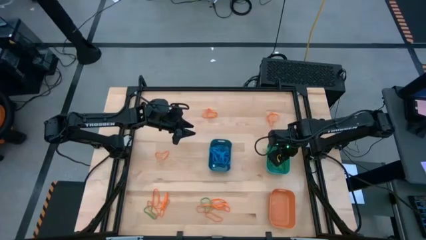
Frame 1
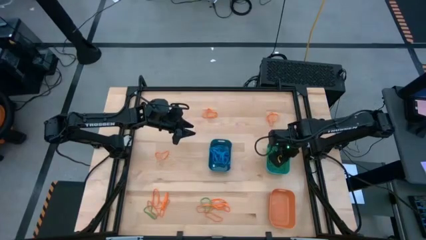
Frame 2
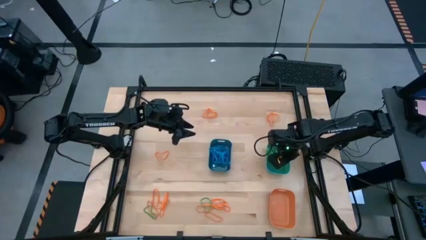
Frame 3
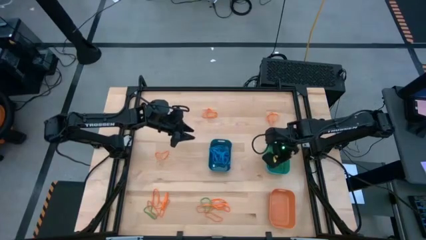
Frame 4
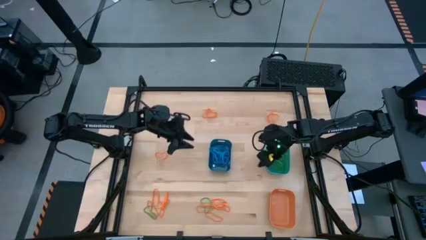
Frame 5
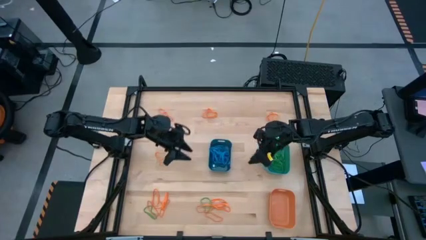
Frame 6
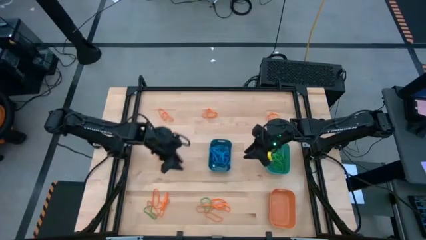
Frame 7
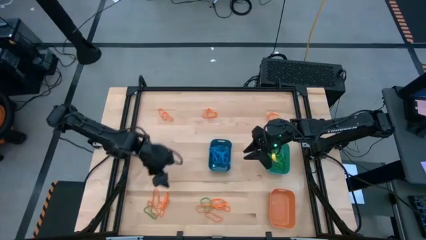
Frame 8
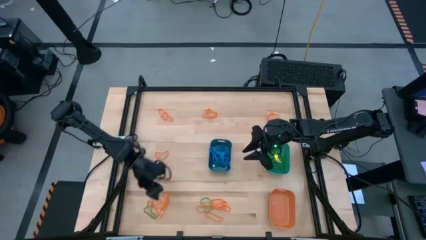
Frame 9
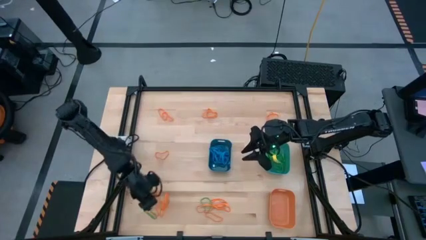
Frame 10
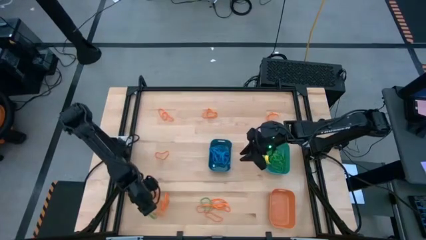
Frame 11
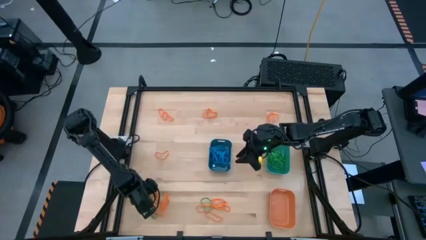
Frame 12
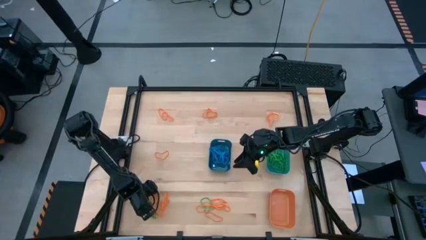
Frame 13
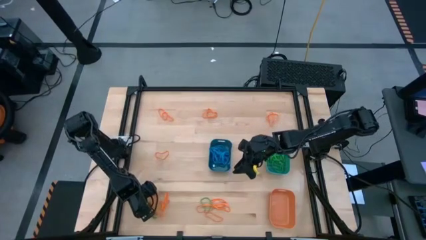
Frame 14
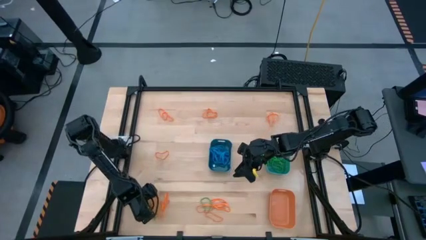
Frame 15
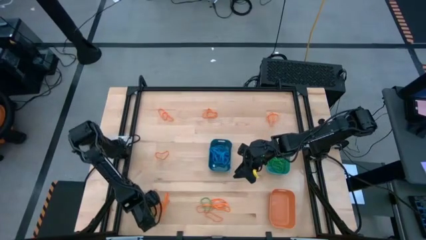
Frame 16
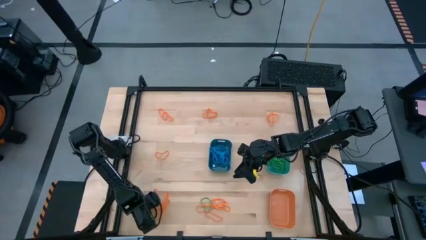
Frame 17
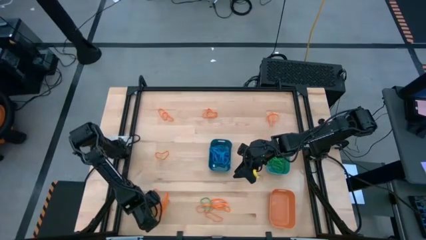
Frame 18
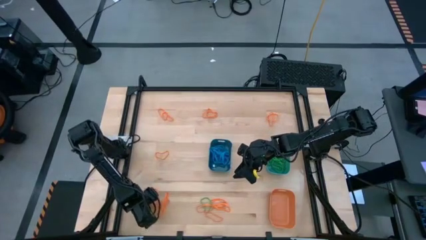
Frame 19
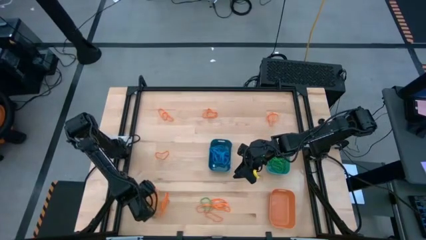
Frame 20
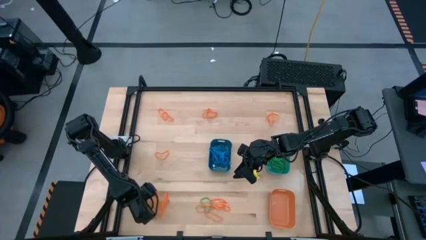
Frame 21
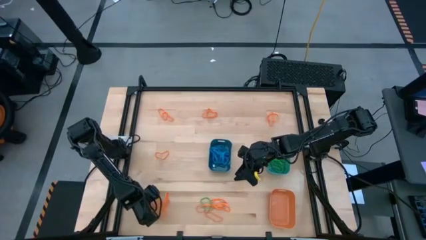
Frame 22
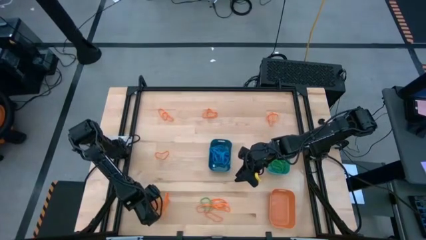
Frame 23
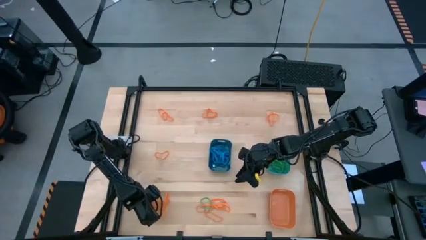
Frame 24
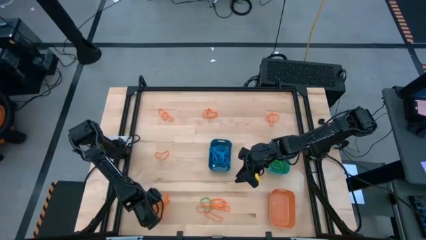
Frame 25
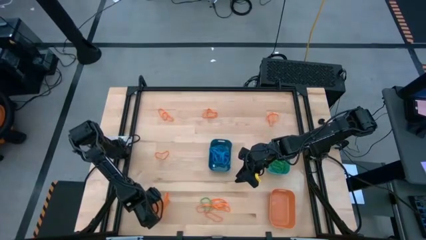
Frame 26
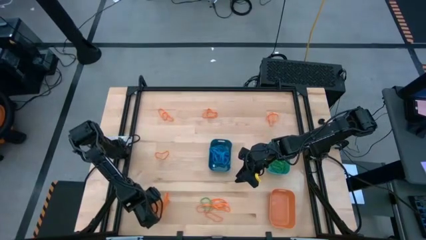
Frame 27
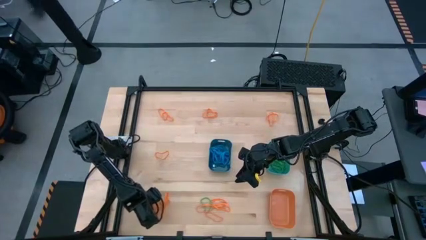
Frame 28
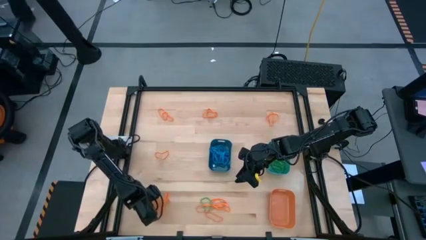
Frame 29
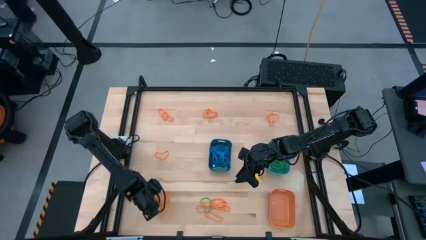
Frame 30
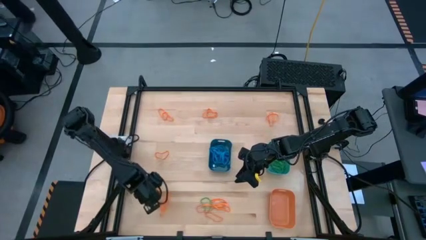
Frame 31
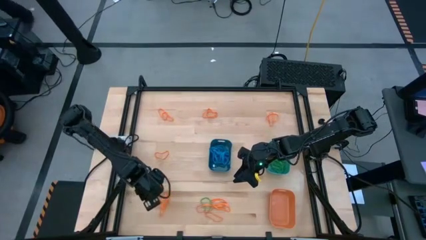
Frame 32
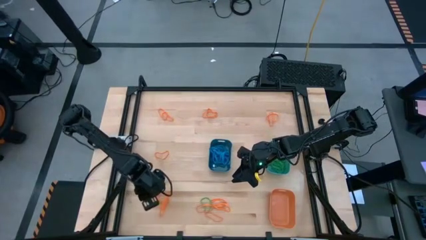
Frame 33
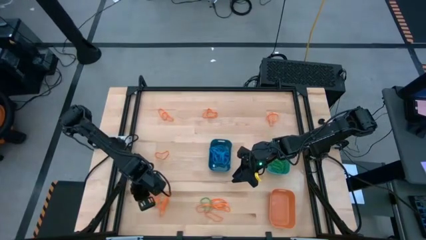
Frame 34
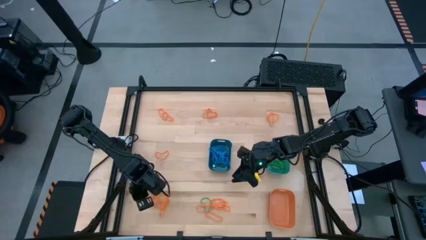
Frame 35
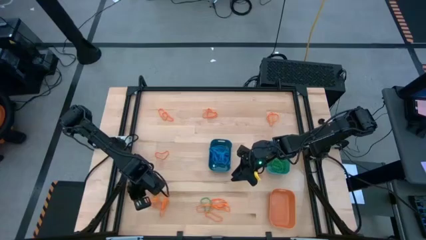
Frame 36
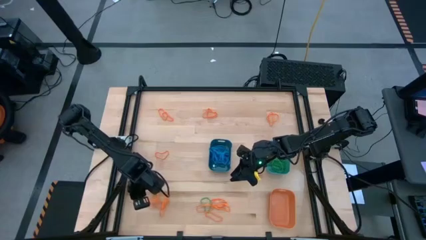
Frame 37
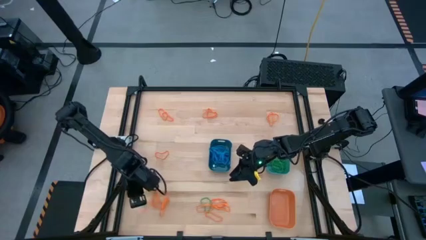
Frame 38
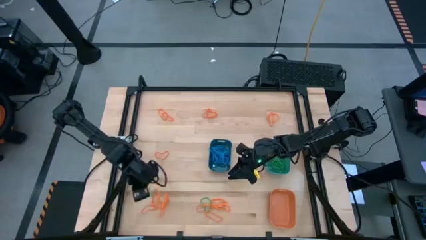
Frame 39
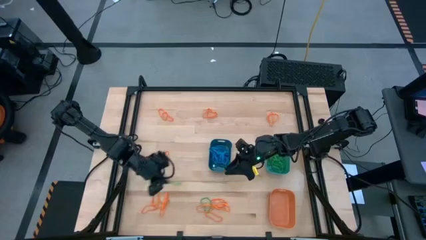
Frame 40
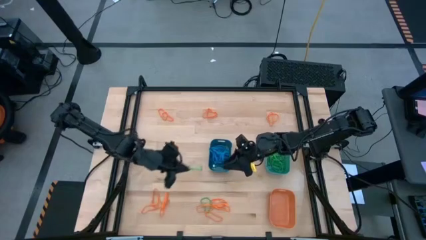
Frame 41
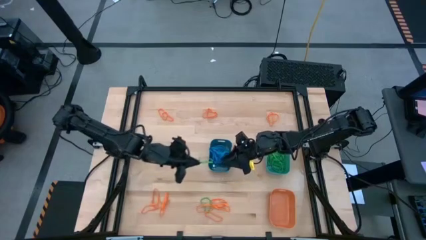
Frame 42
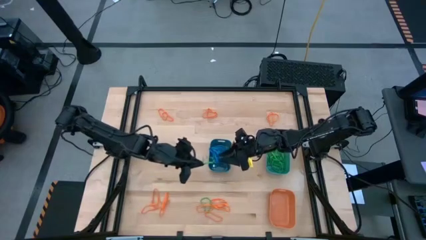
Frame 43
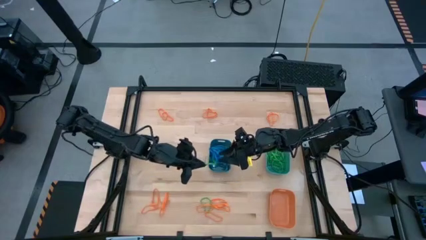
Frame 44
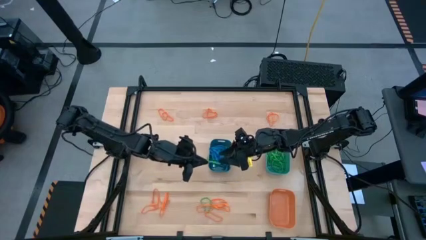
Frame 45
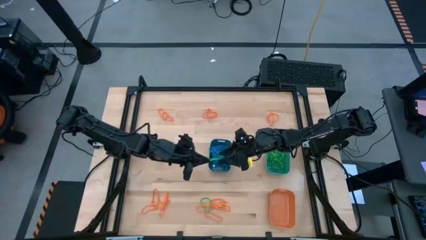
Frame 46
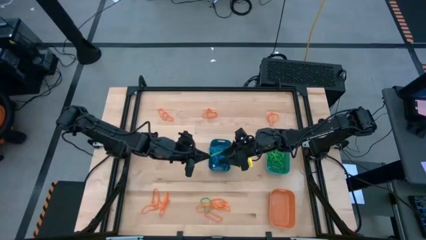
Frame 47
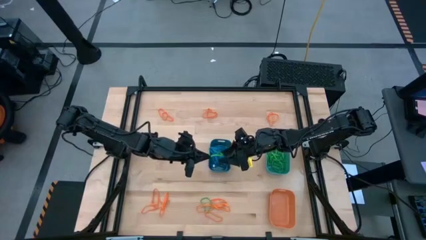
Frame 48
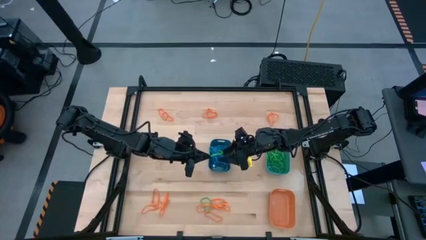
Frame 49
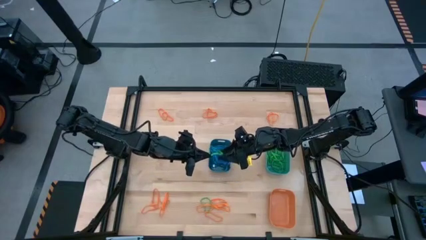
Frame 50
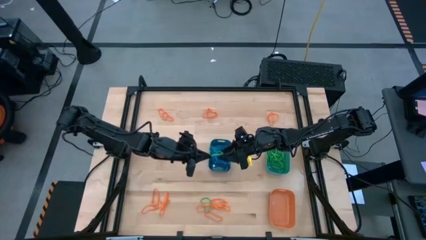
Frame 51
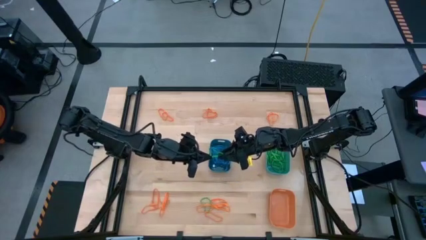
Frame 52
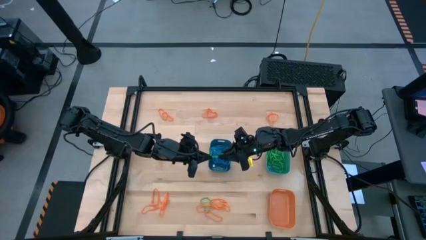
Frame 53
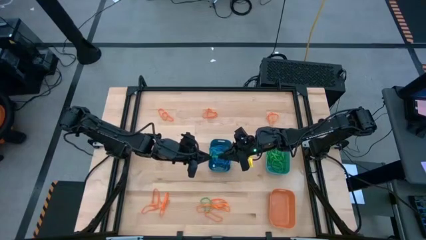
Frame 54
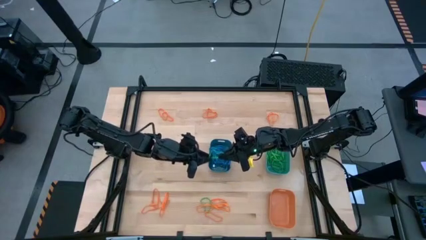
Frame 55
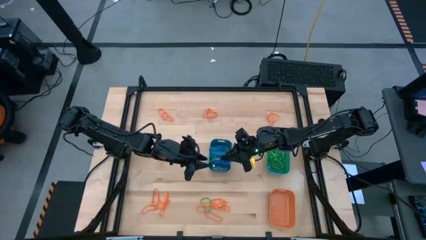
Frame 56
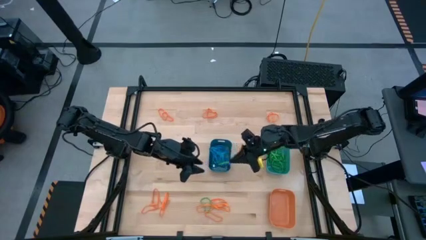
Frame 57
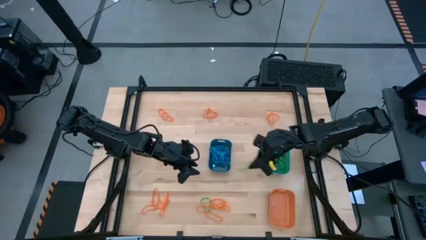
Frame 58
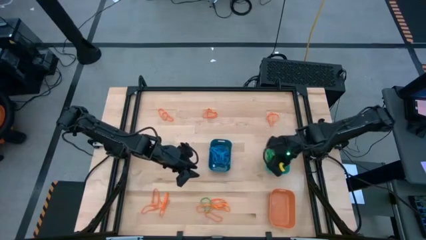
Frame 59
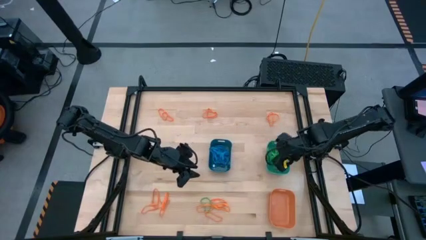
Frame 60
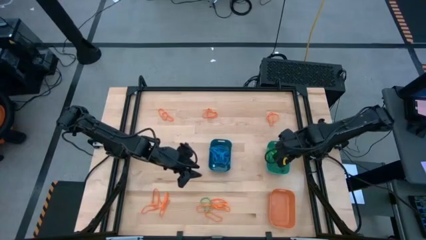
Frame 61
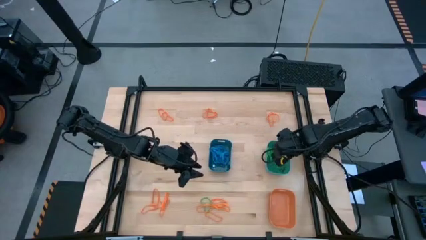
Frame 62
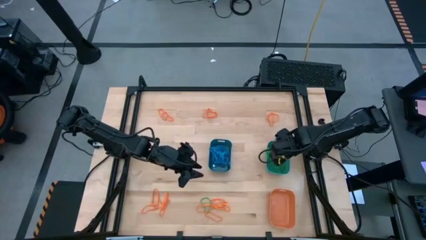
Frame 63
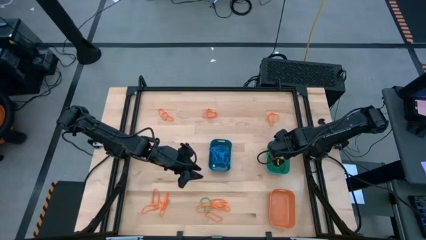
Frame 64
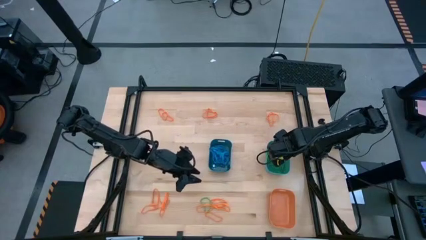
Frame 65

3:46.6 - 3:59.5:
Task: Sort rubber bands into baskets
Put the green rubberband into the light blue bin

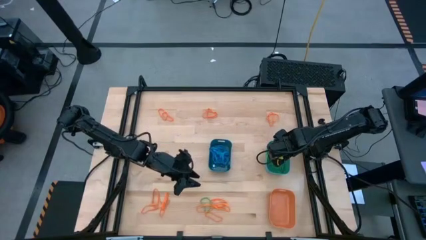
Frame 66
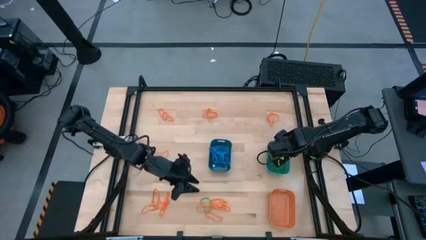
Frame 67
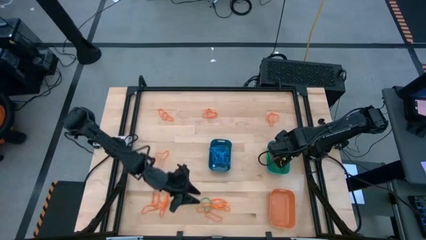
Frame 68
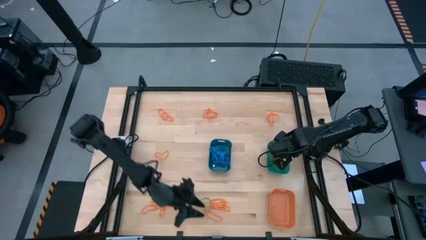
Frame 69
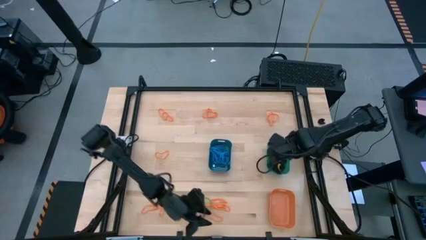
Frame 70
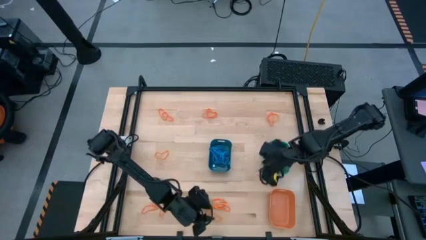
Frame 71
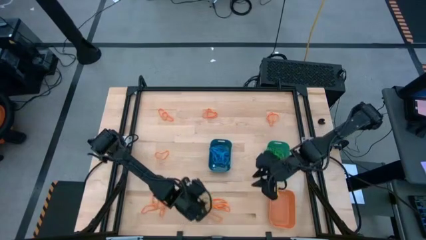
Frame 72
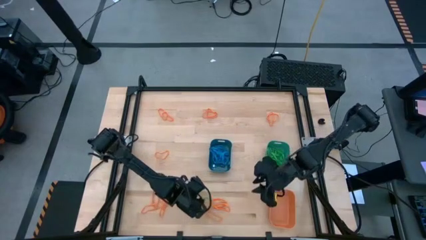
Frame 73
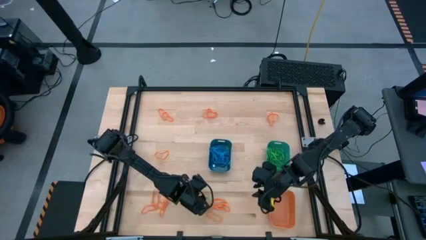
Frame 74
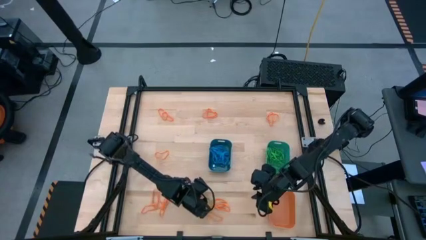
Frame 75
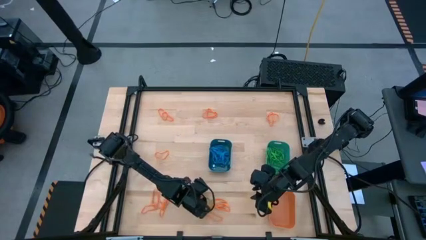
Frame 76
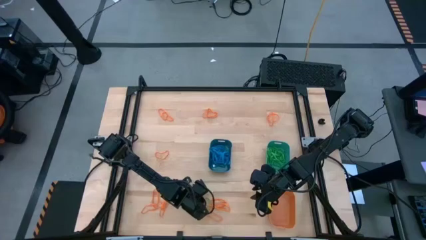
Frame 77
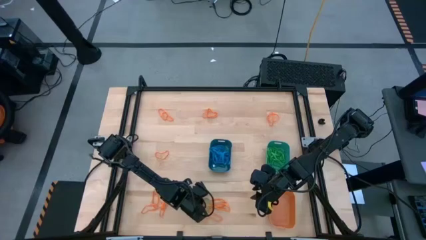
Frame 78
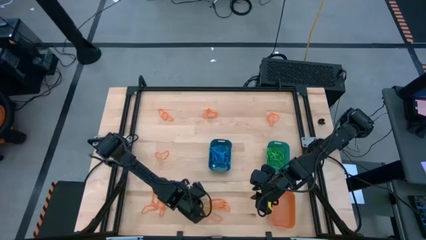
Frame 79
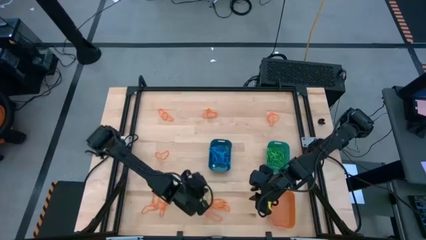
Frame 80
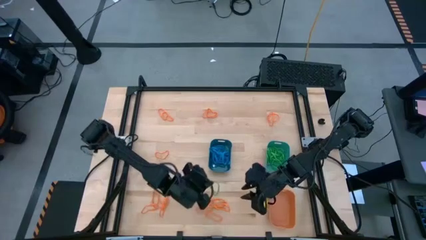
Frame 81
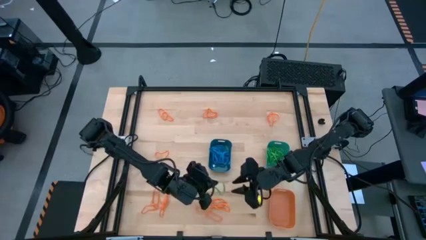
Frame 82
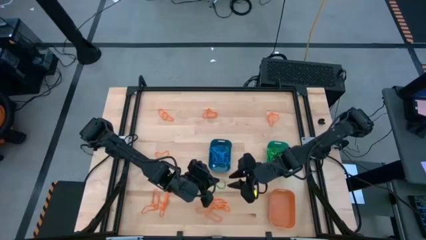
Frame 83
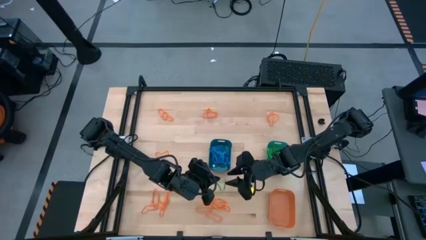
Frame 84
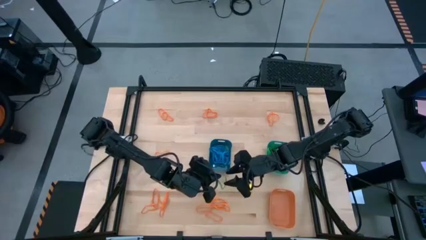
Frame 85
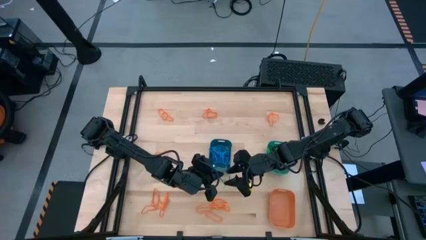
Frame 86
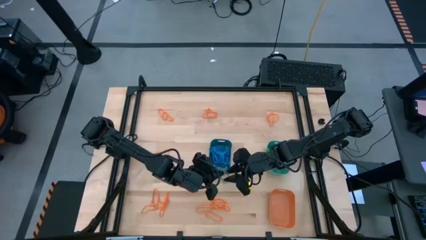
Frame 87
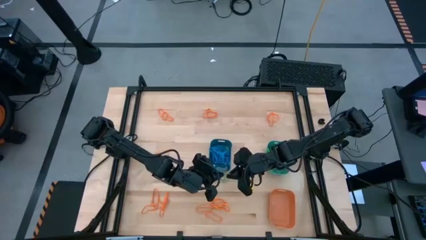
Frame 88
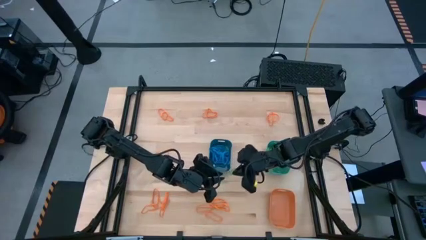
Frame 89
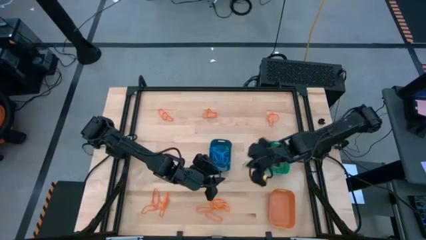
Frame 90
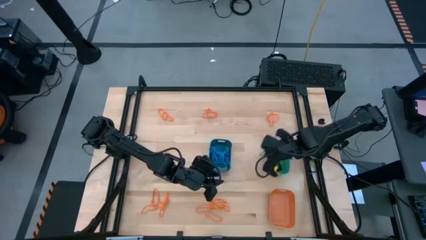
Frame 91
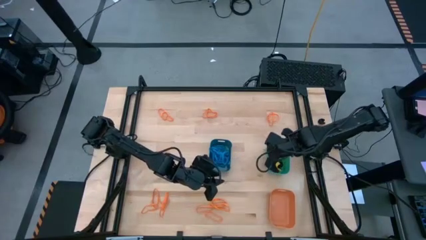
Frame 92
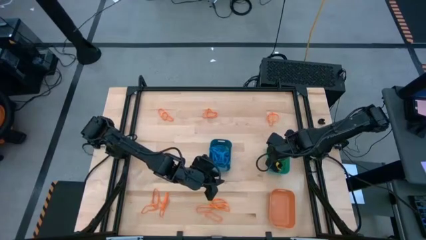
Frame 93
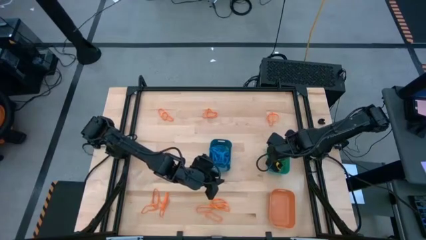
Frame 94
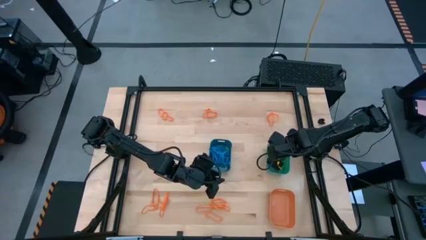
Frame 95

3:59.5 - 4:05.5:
Put the green rubberband into the light blue bin
